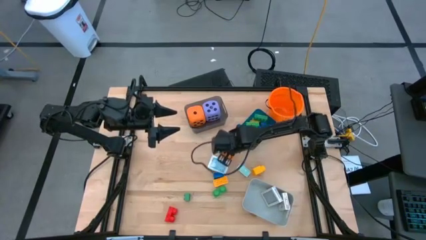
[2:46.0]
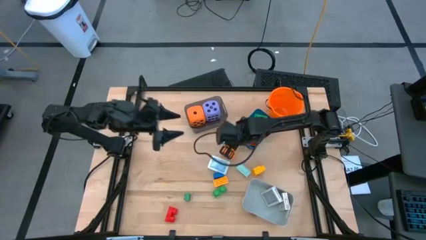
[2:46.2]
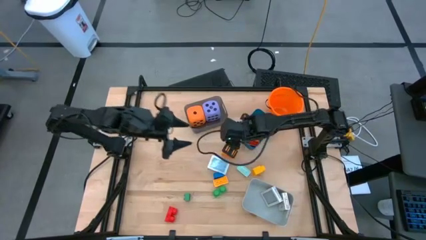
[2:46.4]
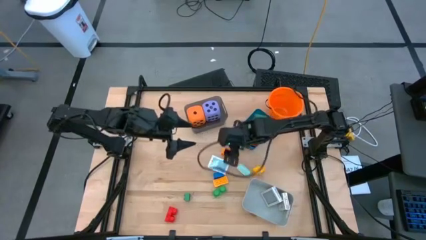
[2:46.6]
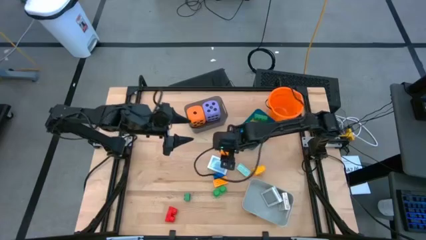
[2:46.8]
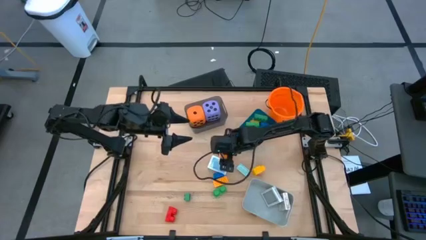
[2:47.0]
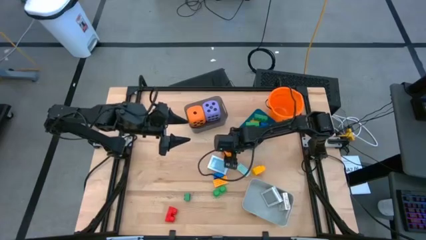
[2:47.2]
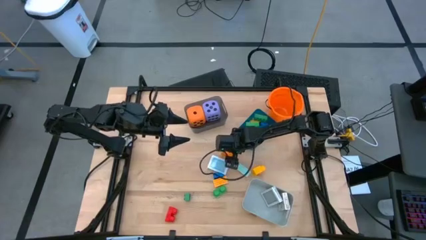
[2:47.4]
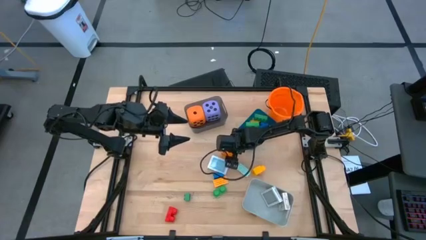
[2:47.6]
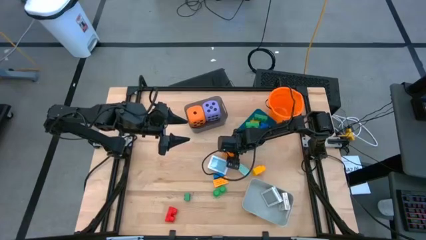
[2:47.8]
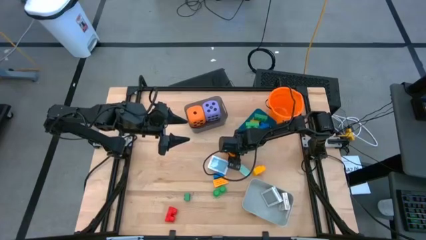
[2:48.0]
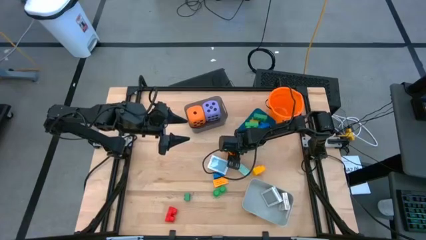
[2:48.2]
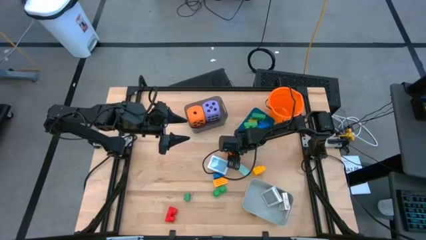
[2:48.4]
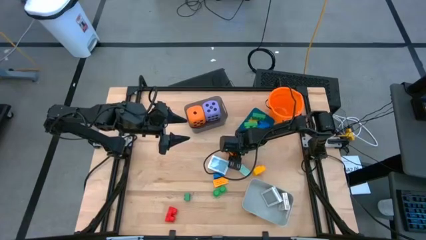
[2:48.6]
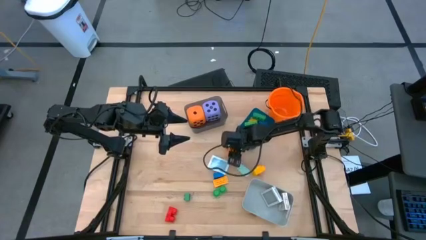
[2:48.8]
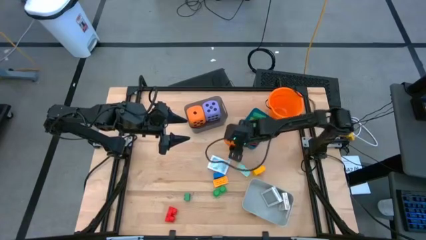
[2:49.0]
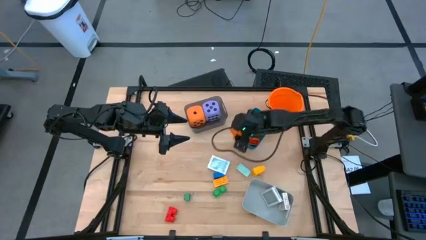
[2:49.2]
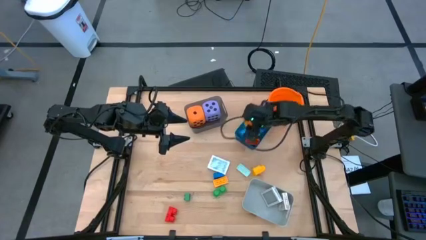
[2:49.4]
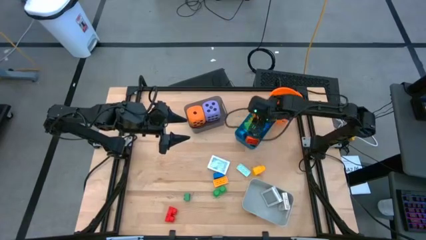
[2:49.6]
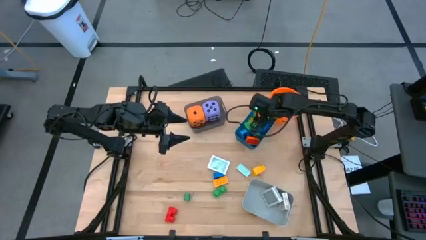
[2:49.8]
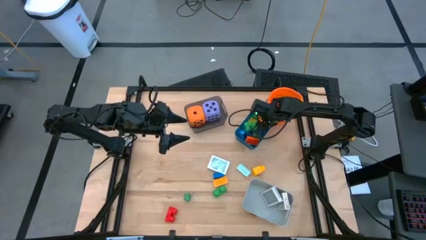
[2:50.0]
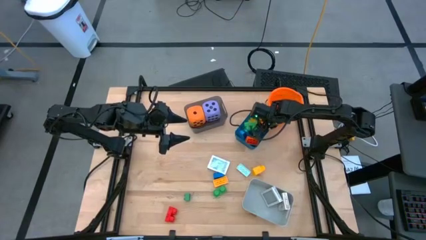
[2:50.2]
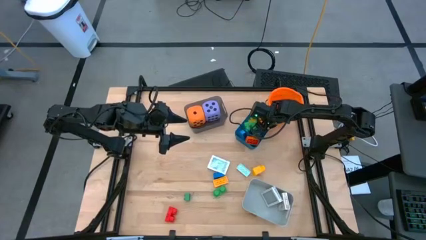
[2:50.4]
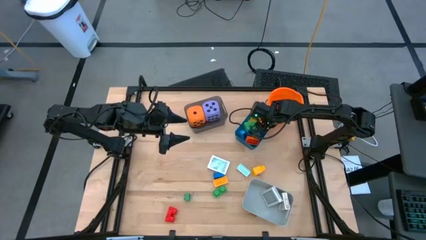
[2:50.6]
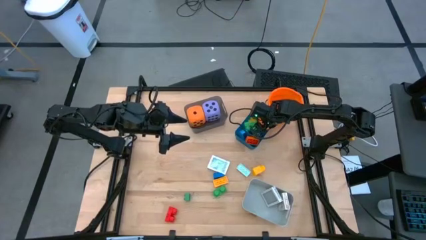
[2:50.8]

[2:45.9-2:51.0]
Task: Pick & Place Toys
Put the orange game piece into the blue bin

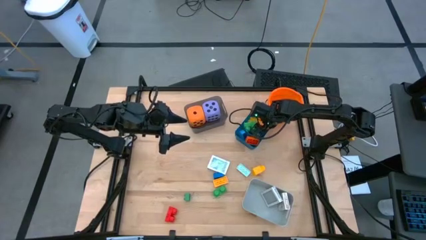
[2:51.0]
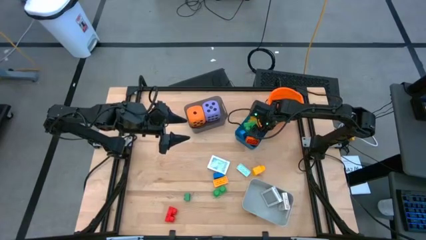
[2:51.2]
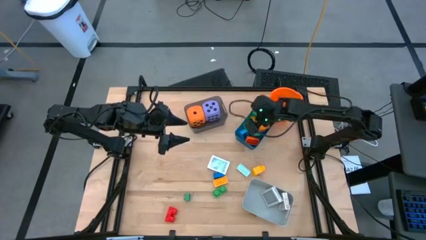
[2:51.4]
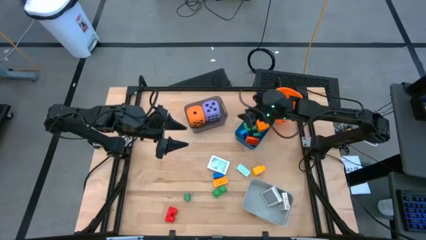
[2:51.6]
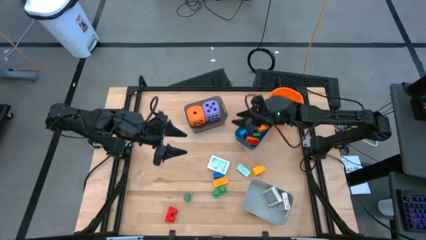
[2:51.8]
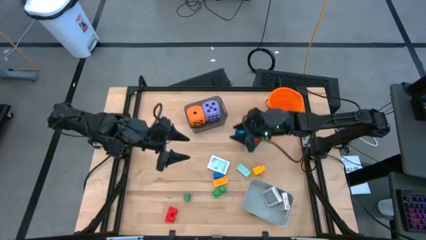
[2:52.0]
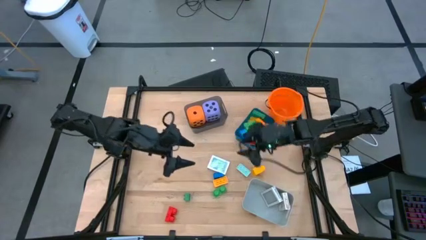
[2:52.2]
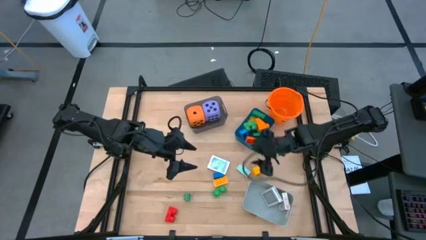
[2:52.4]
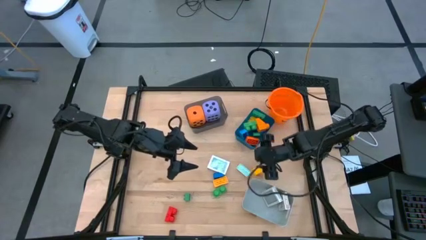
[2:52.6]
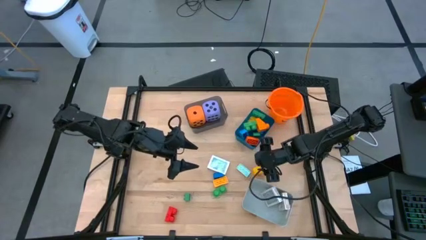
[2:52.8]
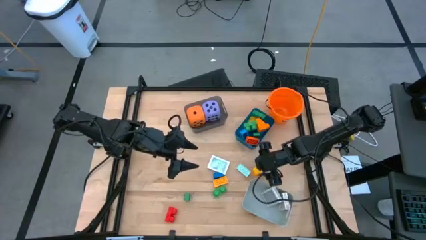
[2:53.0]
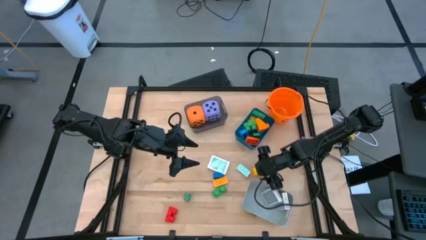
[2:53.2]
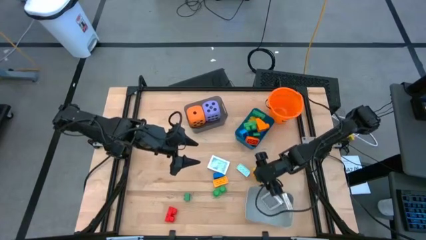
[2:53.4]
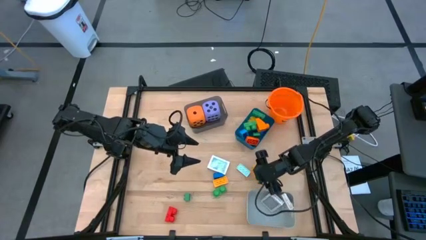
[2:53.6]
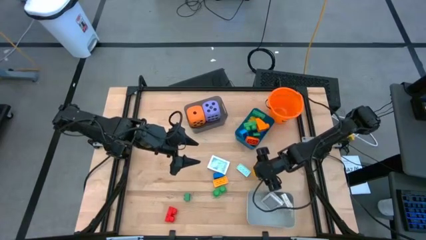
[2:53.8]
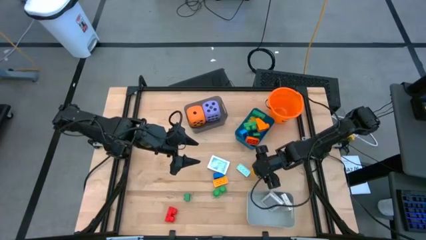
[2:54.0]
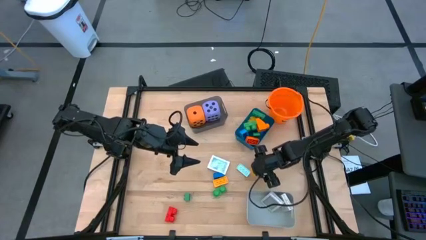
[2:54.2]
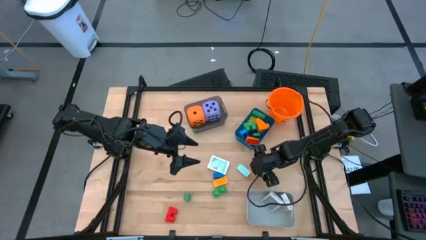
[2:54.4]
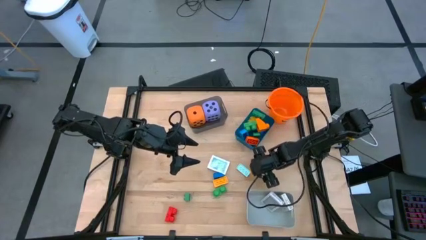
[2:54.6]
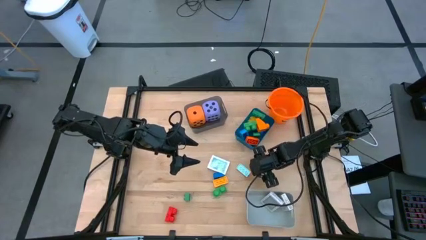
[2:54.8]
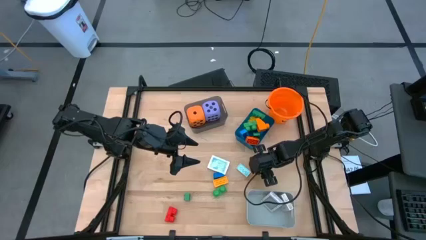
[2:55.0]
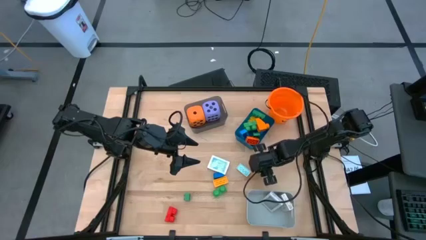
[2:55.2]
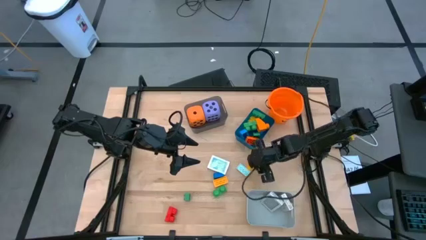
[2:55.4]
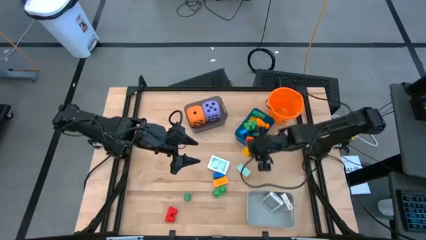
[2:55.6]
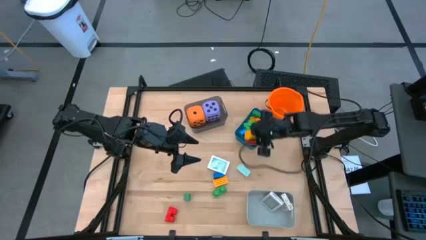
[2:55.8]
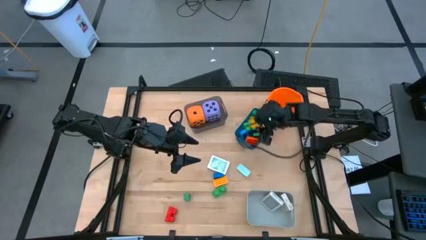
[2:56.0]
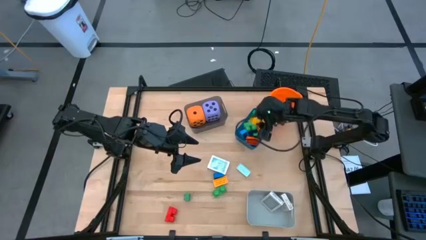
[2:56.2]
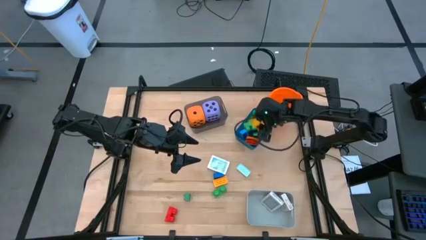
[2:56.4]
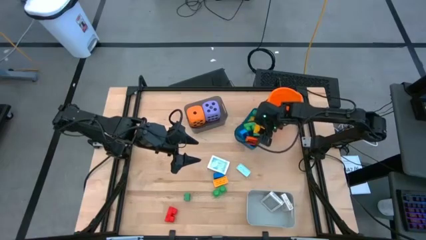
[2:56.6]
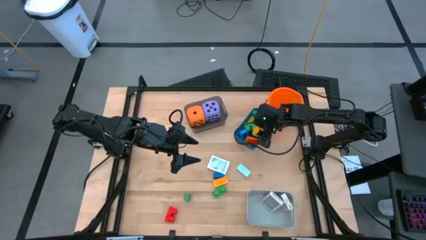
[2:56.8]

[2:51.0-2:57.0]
Put the right yellow game piece into the blue bin

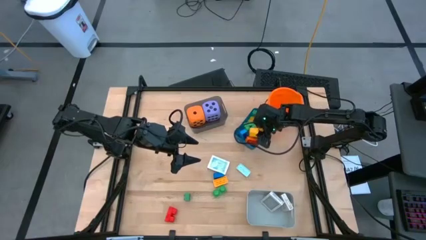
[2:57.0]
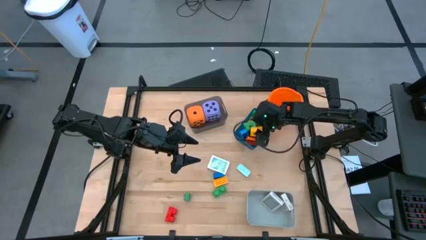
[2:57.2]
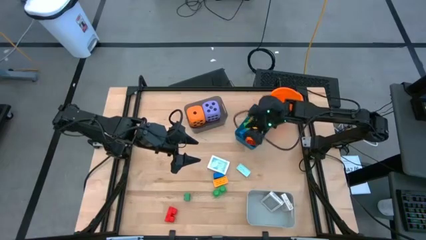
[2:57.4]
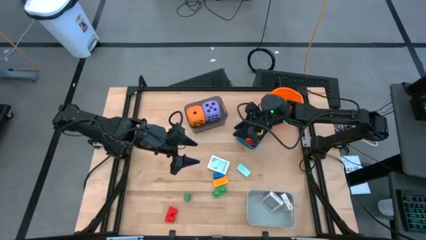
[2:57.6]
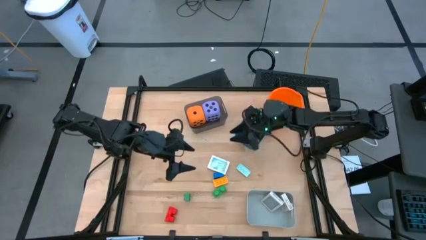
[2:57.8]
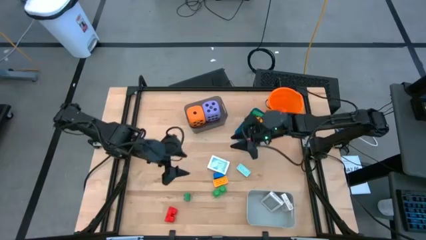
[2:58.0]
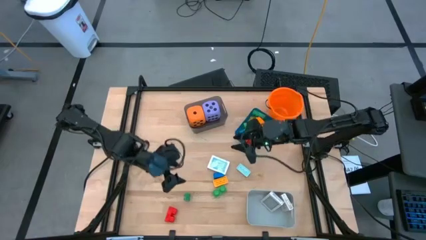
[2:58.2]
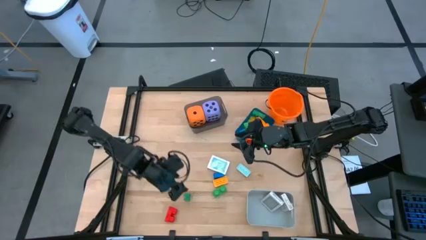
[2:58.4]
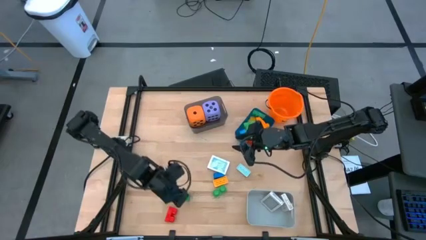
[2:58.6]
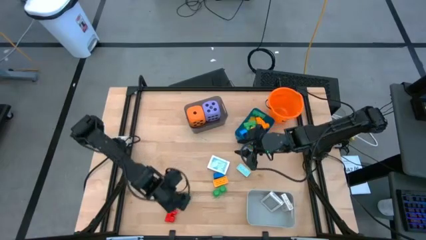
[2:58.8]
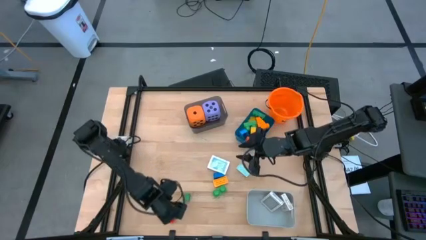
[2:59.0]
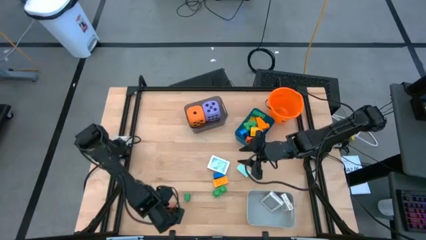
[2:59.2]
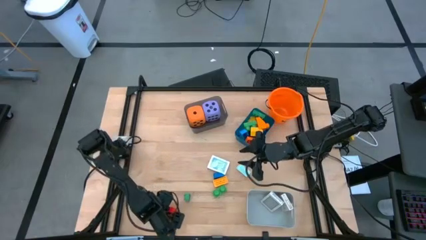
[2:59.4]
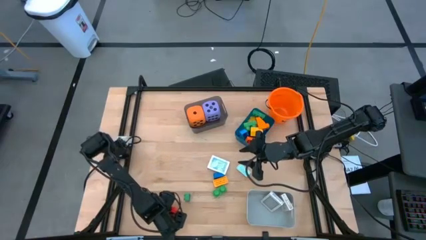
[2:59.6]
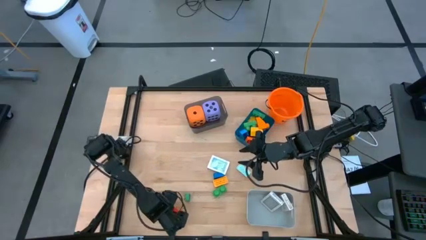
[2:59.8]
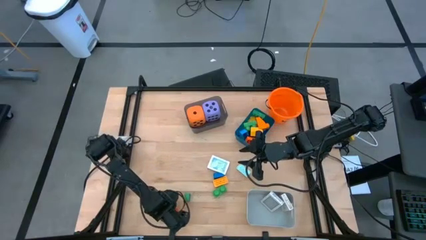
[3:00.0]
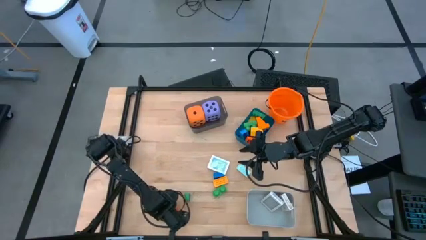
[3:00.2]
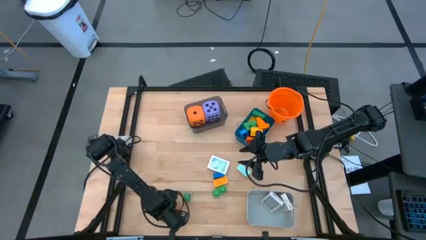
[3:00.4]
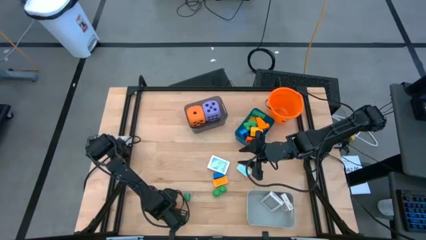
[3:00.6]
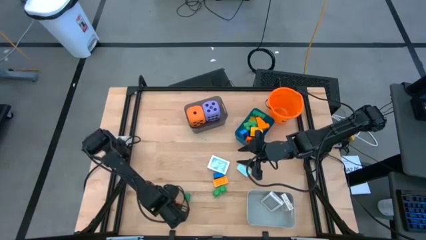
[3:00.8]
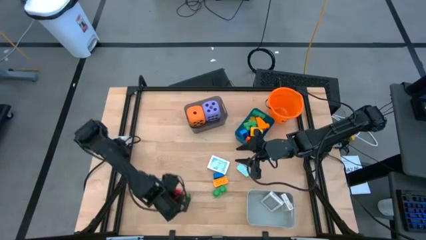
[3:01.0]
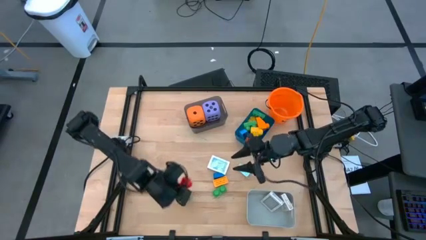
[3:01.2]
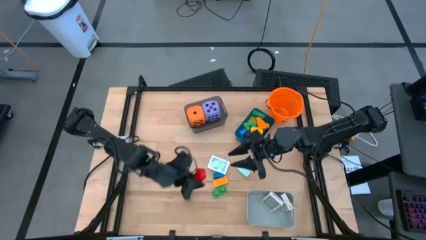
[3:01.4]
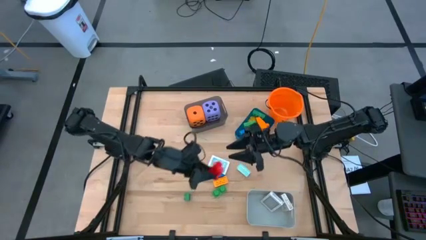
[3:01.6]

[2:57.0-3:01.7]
Put the red game piece into the blue bin
